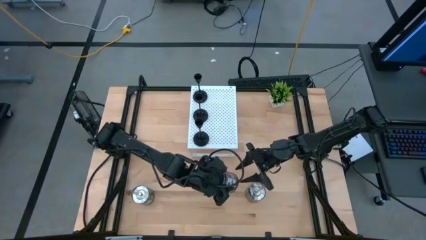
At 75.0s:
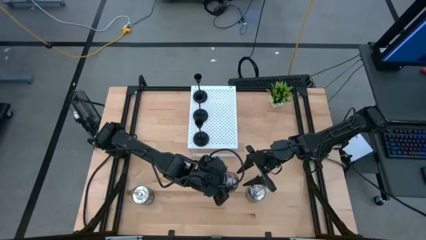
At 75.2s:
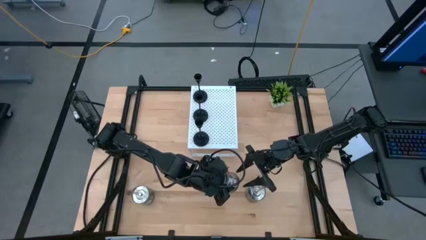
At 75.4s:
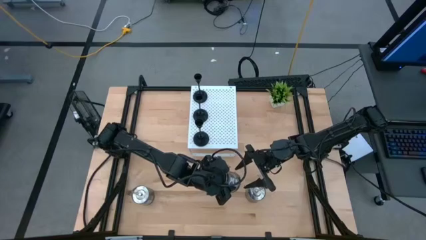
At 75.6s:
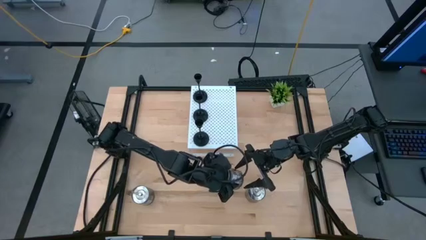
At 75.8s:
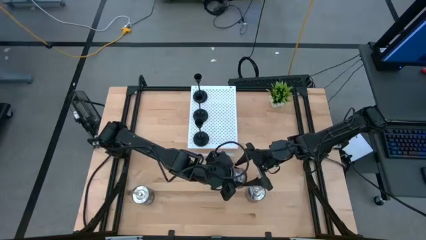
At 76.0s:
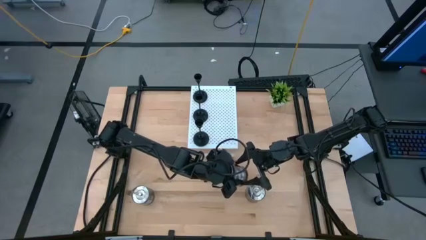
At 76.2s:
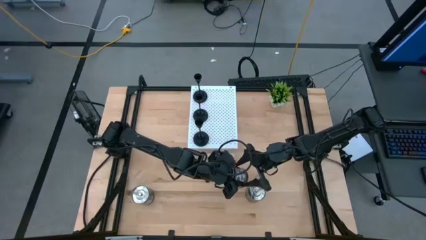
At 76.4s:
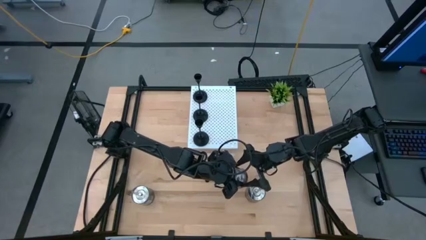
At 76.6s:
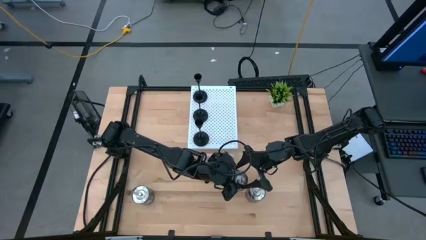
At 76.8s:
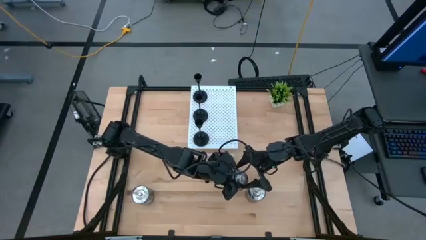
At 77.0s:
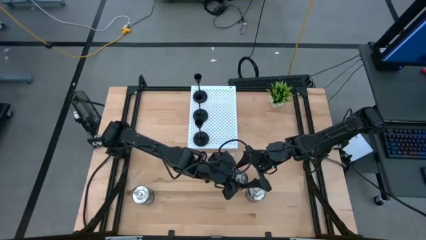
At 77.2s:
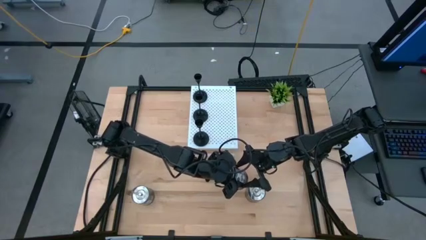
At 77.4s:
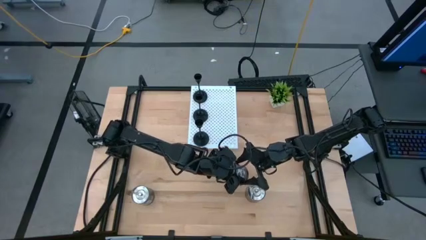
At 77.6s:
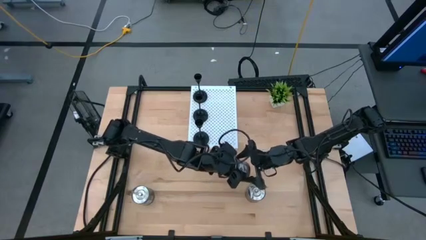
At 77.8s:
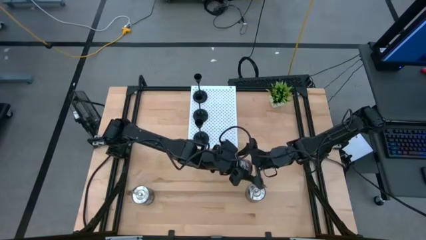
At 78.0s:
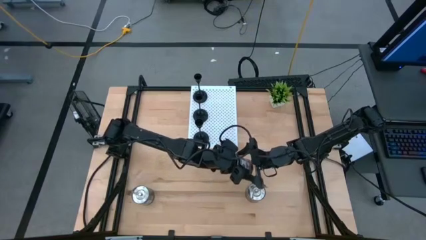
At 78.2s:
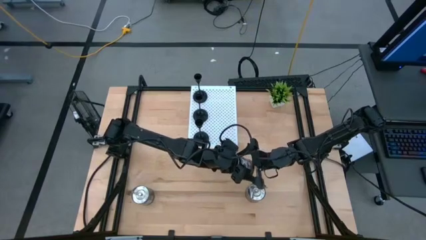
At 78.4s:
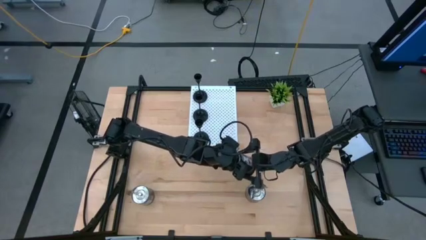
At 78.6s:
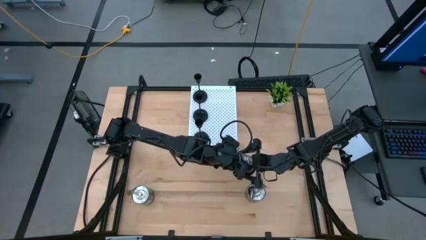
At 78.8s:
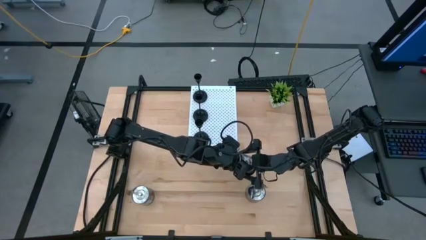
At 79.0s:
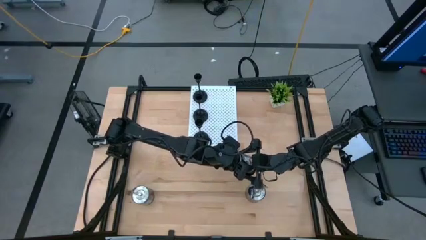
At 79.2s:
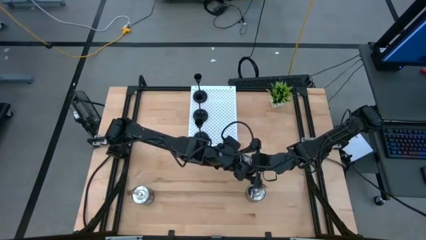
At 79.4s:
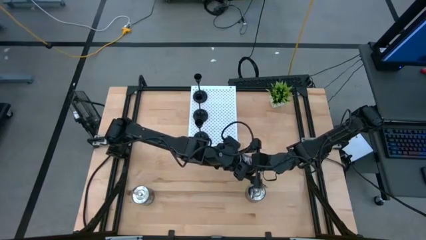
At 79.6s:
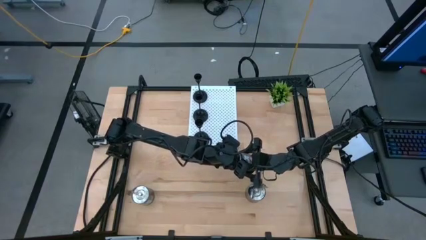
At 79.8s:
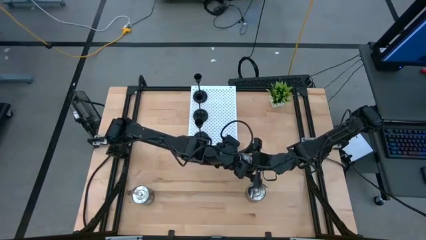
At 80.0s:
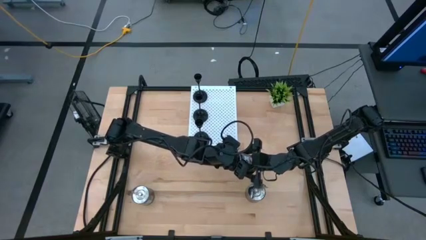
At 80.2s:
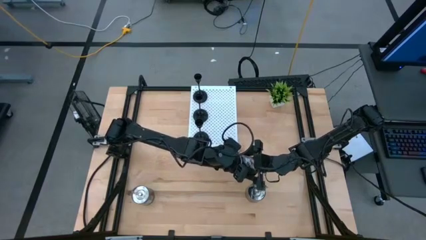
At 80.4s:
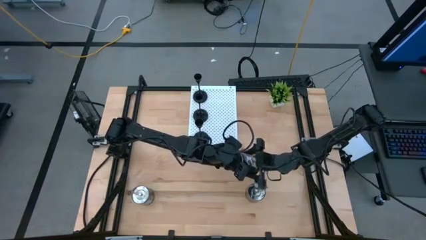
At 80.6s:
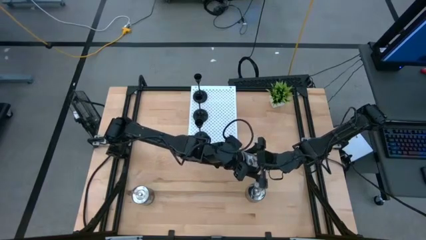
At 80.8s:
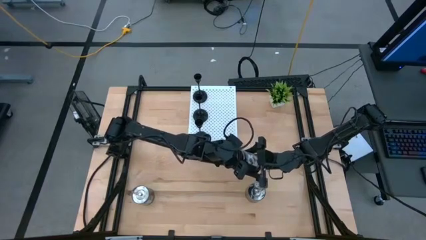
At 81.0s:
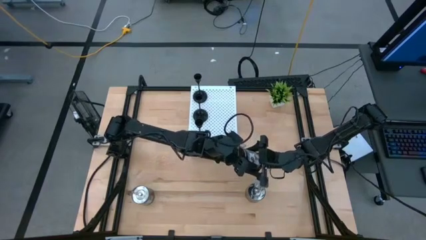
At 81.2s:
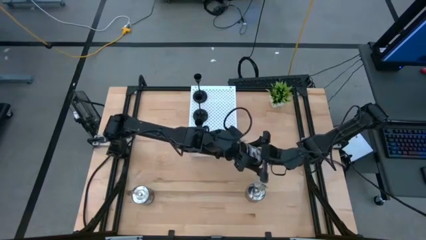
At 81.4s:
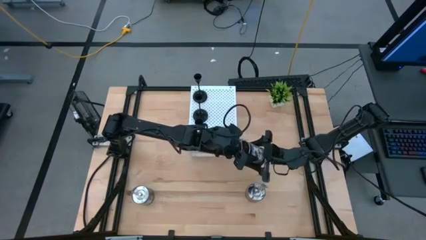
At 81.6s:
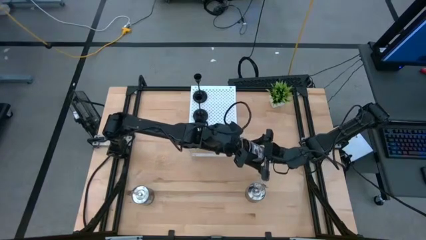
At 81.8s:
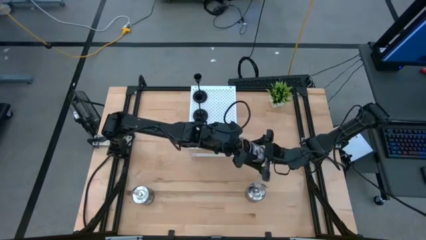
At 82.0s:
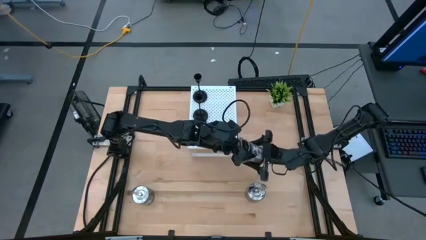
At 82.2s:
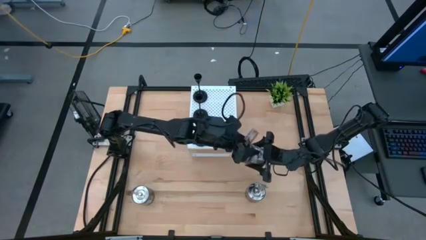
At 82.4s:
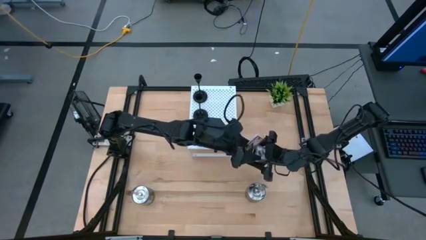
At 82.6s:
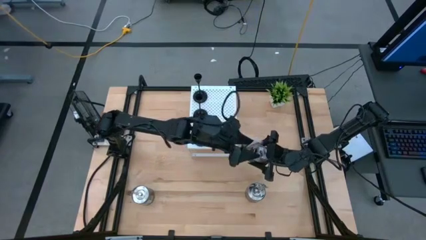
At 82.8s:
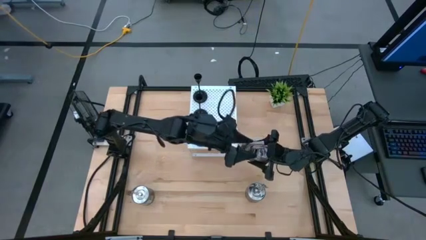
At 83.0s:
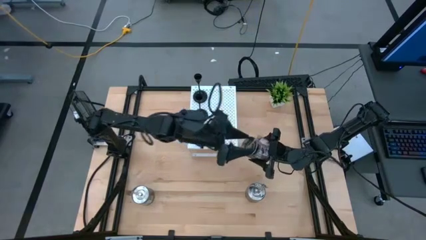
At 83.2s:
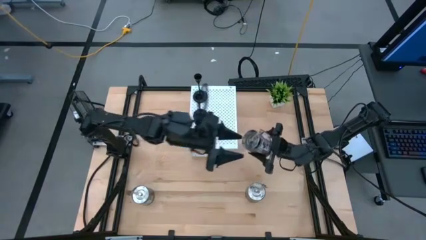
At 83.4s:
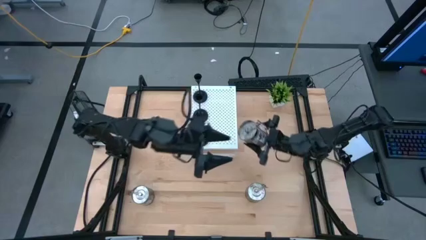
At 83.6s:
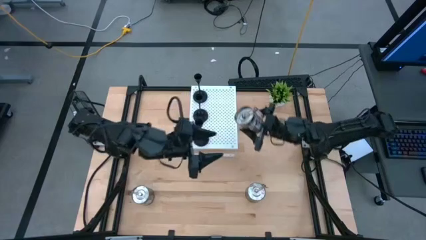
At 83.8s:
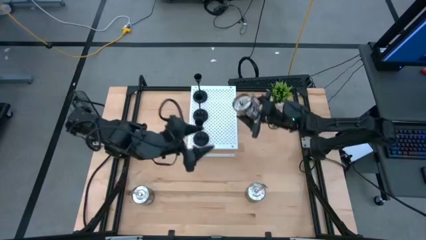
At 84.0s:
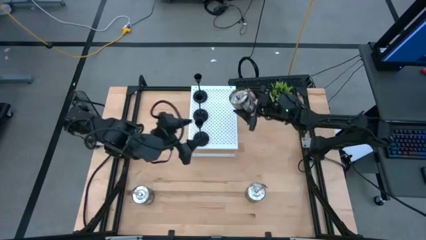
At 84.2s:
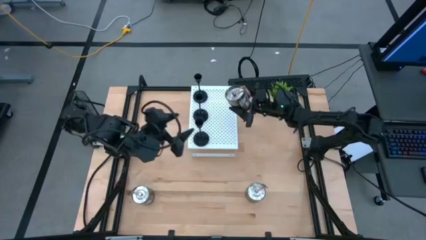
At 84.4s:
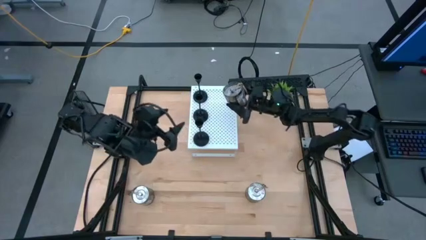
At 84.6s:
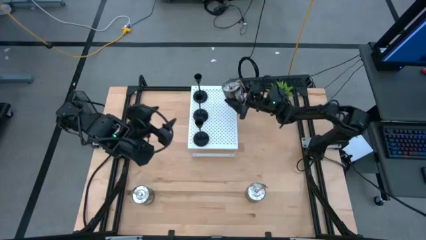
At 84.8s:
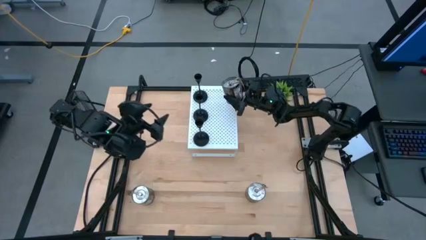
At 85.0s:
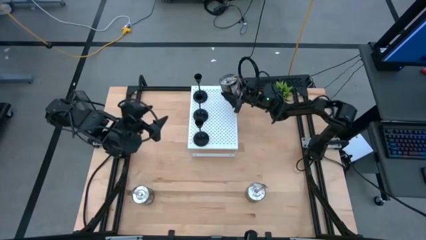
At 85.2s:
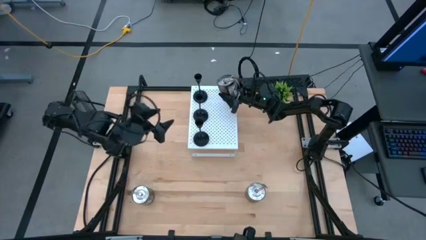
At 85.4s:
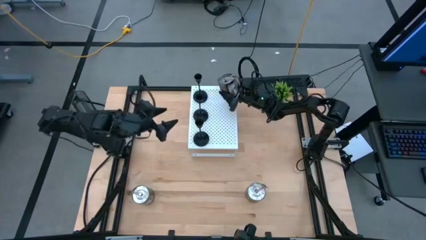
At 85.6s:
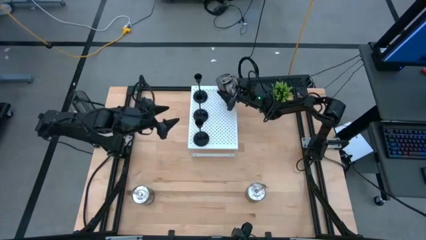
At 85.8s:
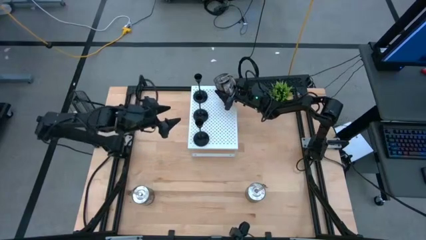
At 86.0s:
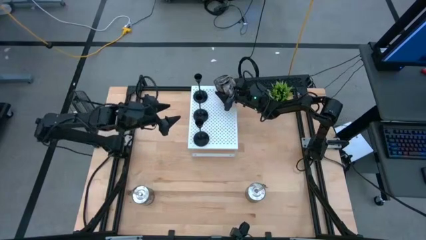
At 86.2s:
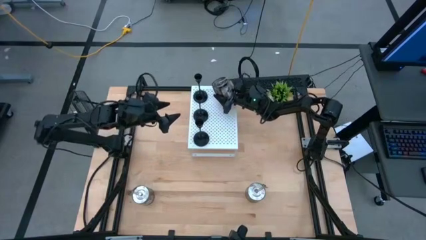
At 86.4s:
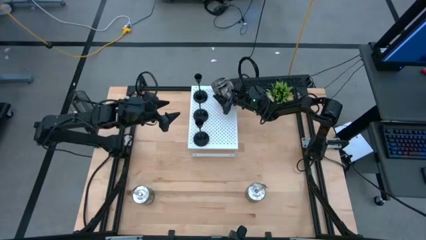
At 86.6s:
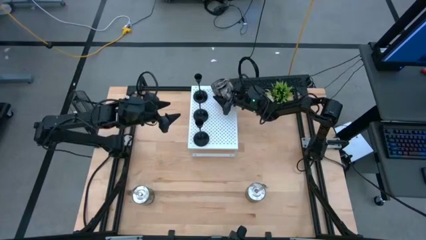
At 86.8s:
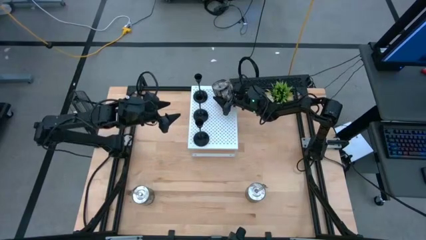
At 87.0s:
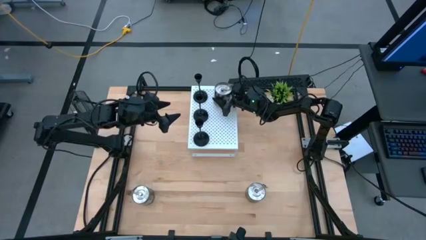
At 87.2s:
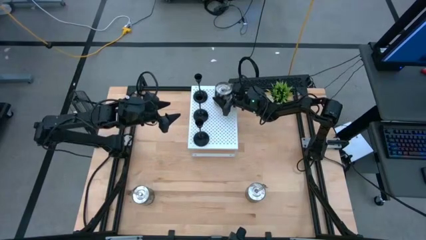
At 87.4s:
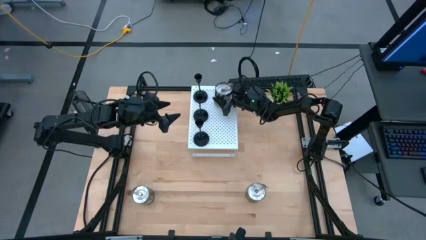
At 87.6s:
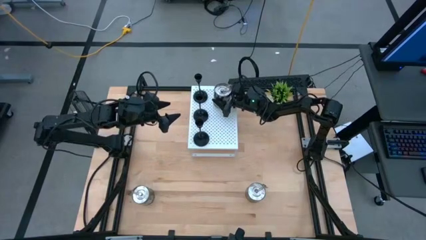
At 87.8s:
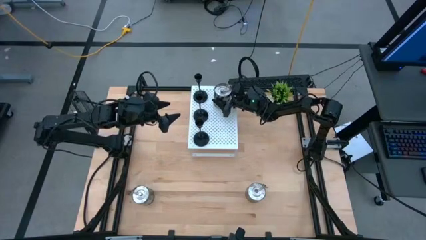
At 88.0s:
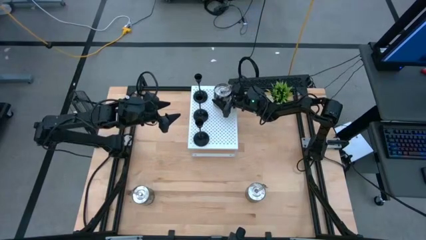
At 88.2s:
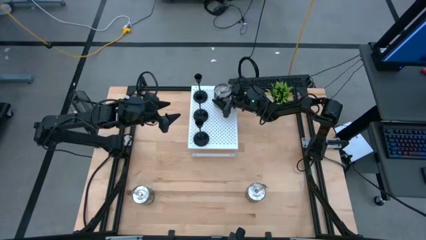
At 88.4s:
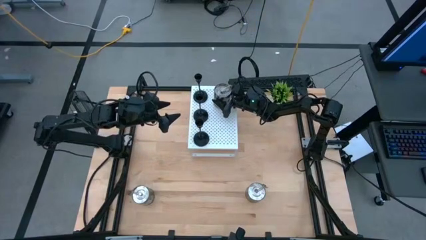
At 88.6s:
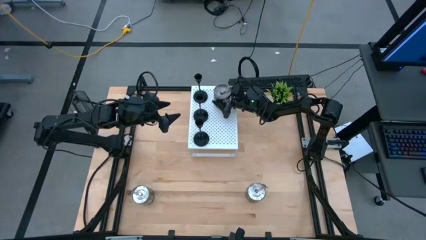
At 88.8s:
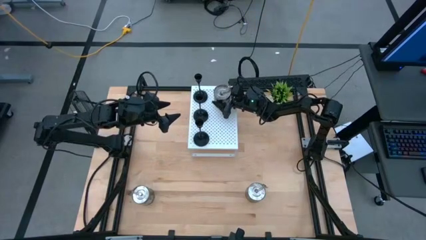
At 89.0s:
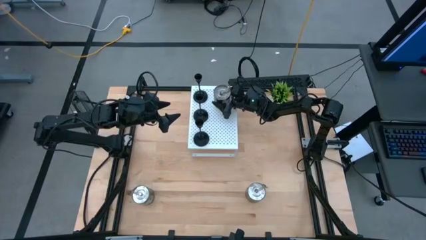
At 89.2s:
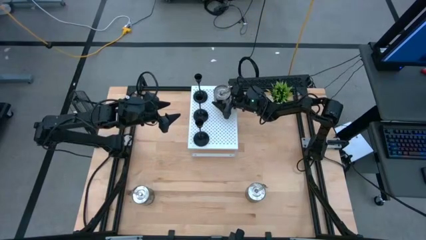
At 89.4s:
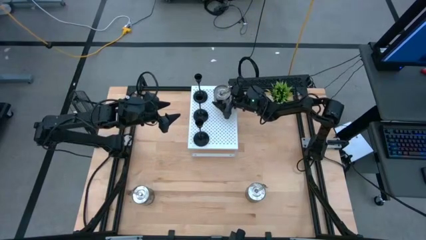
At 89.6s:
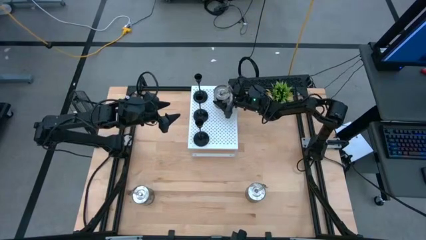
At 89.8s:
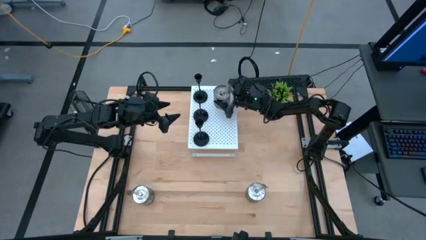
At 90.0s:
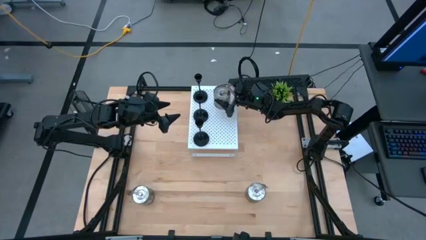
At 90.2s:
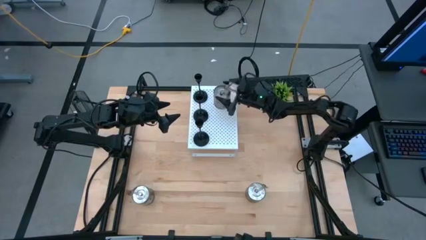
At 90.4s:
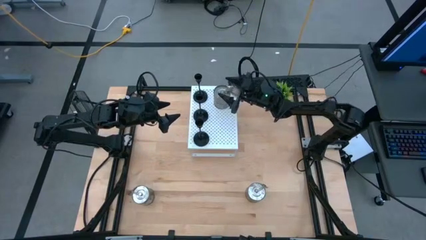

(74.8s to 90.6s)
Task: Pick & Place candle stick holders
Put the top silver scented candle on the shelf
